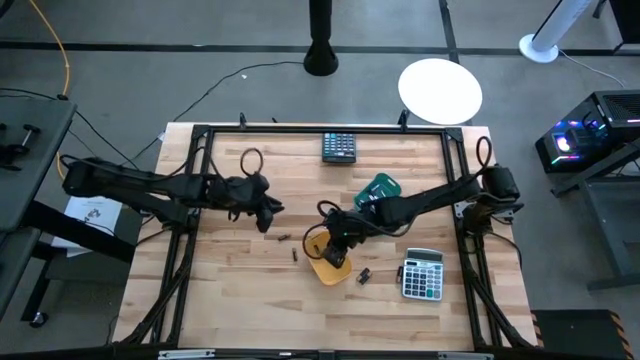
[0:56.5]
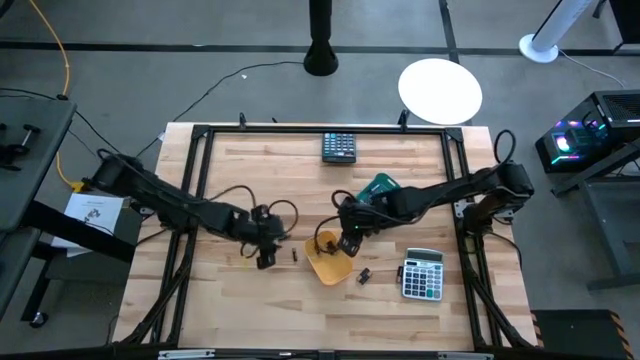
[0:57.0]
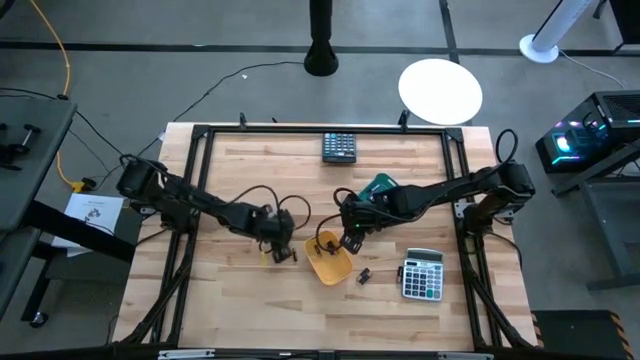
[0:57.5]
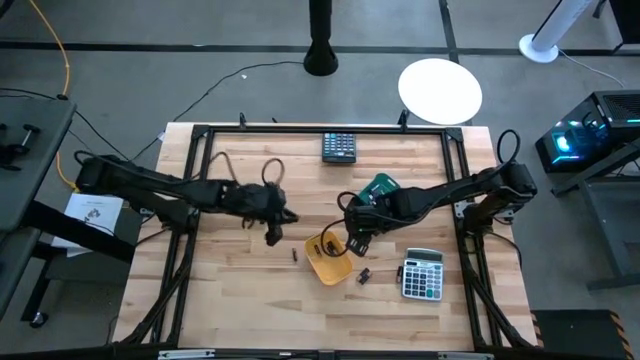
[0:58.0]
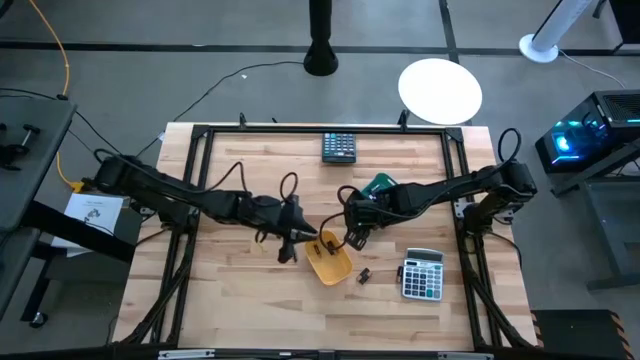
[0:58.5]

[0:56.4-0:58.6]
Task: Sort batteries
Put the black battery into the yellow bin

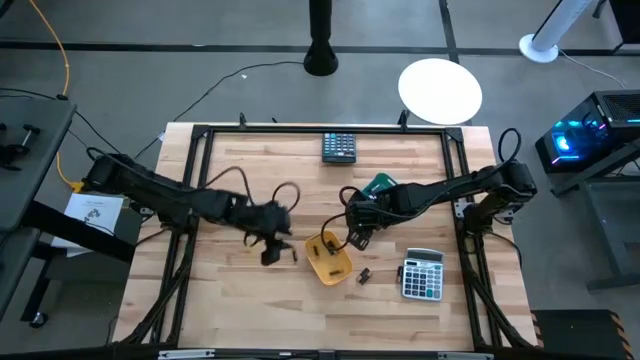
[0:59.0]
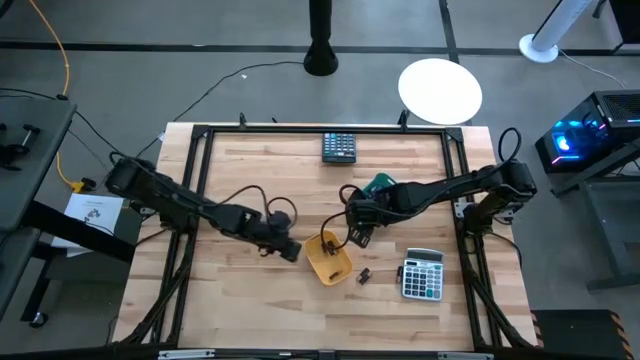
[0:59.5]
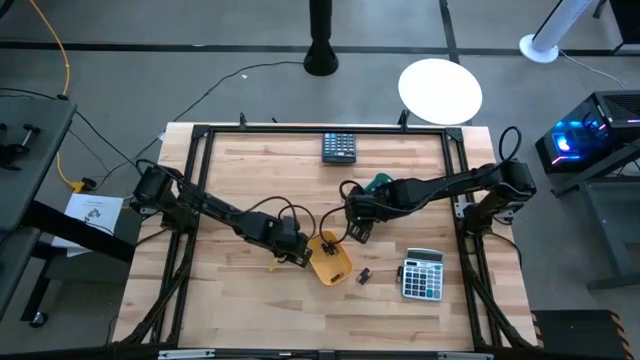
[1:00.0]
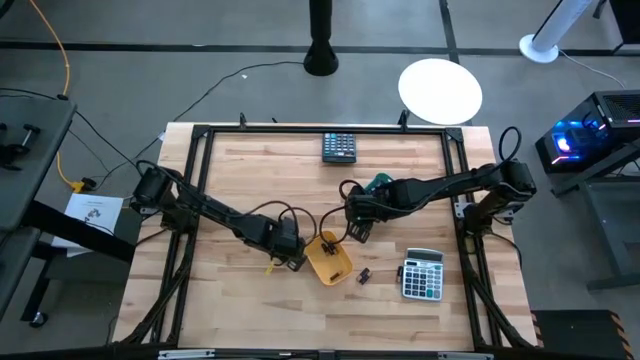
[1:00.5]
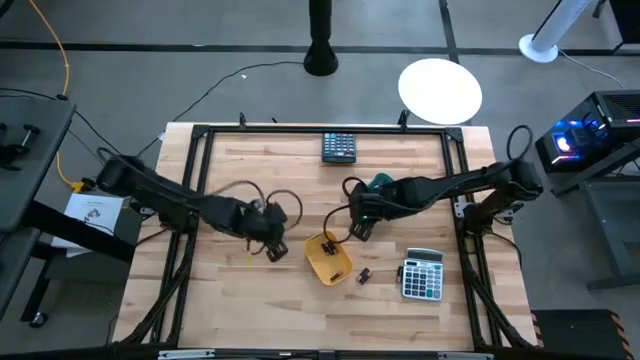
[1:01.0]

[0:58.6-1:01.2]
Put the black battery into the yellow bin

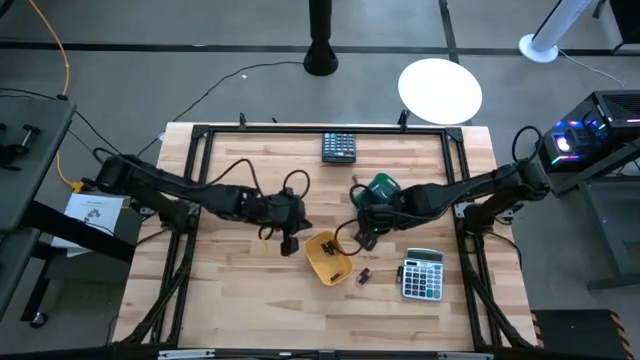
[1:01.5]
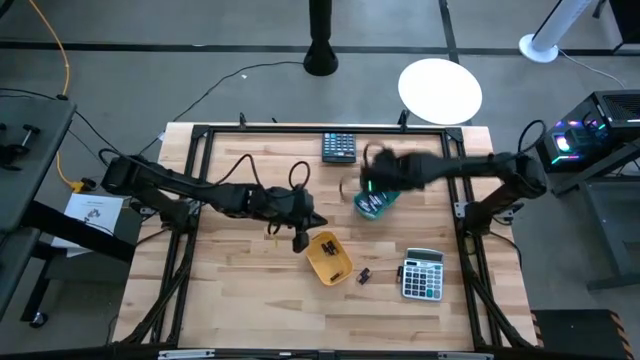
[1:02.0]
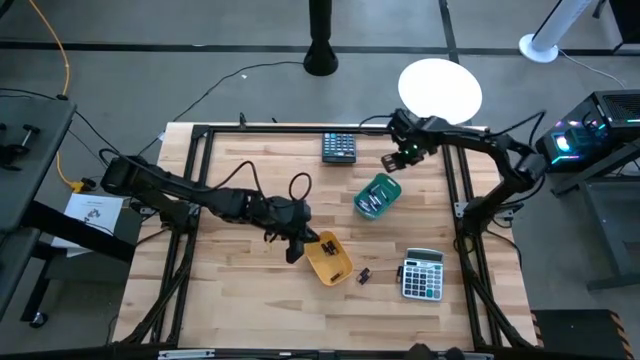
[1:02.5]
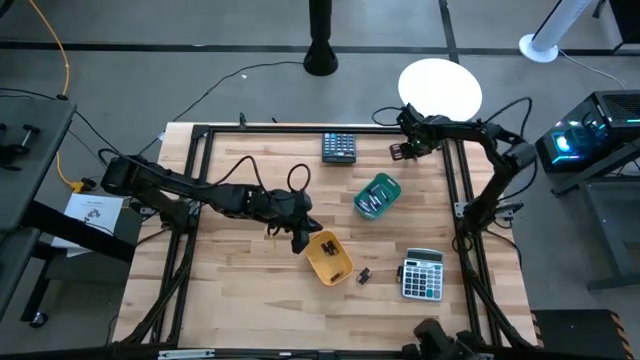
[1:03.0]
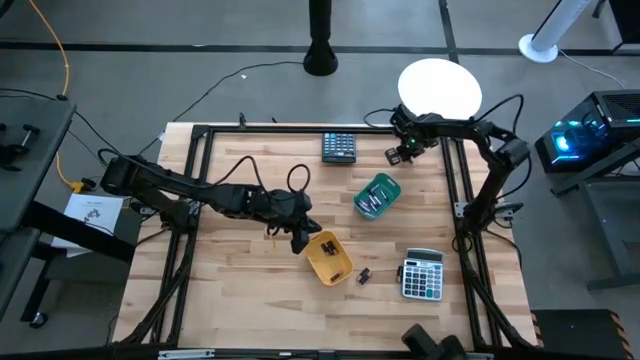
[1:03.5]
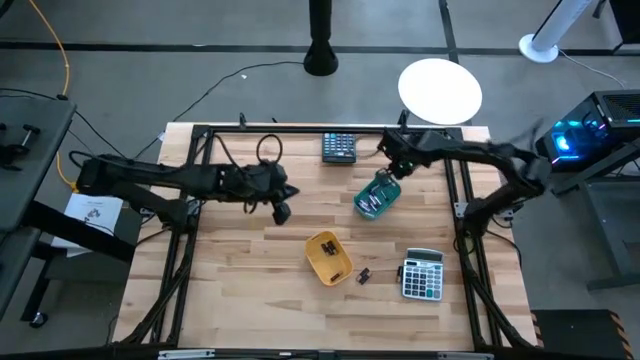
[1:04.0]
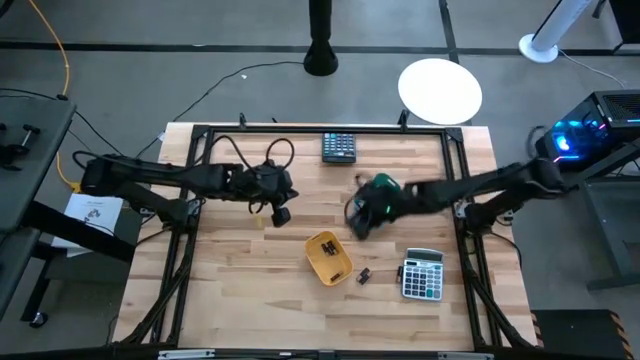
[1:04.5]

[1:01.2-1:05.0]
Put the black battery into the yellow bin

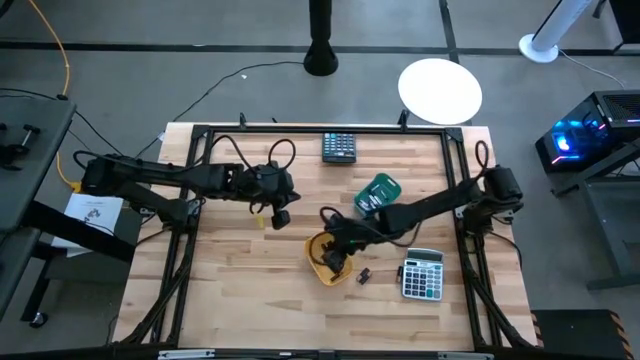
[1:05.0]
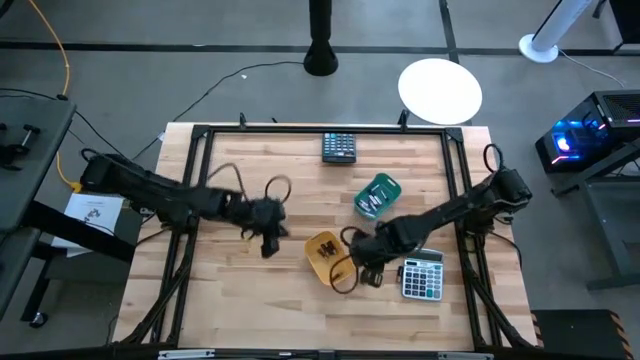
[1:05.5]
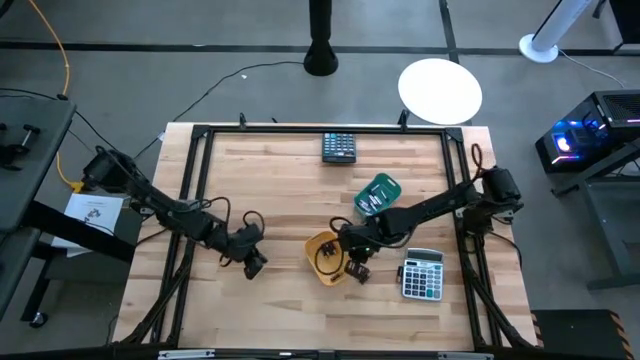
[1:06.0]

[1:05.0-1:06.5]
Adjust the yellow bin

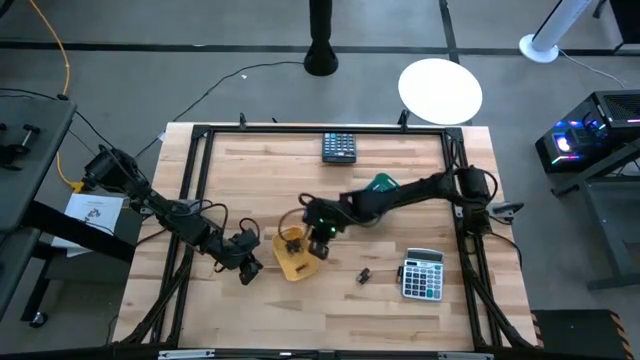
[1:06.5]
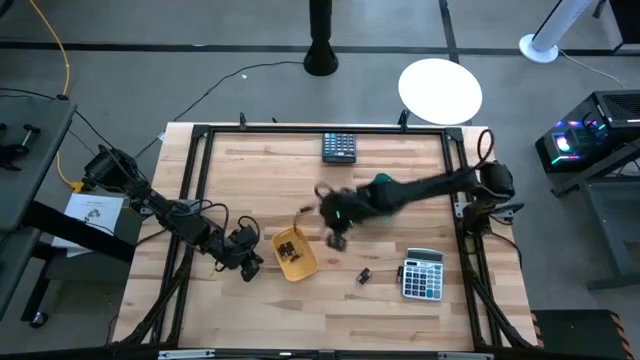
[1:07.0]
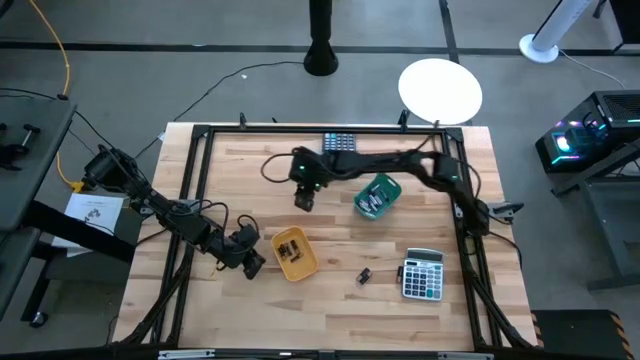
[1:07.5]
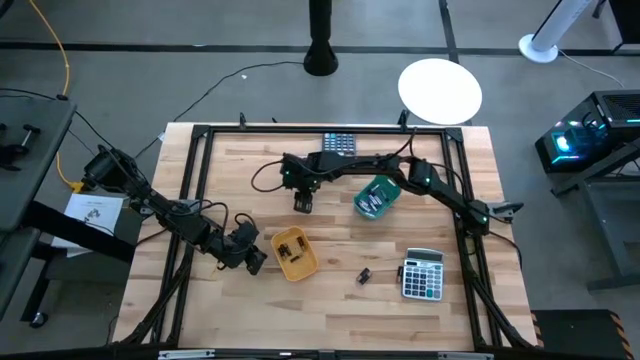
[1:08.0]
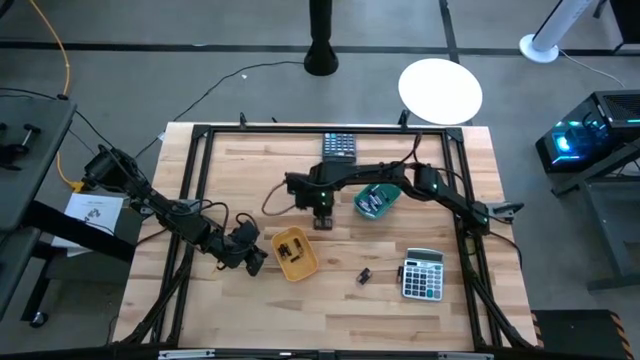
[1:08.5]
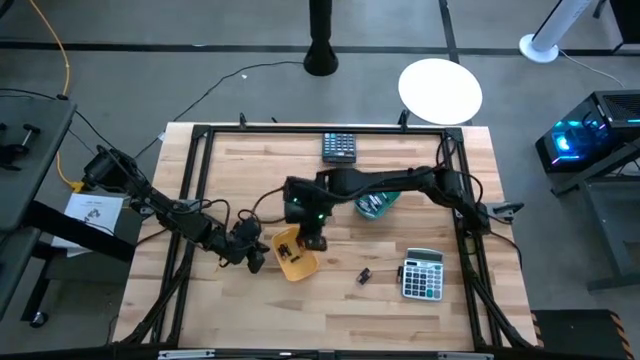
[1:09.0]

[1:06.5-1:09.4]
Put the black battery into the yellow bin

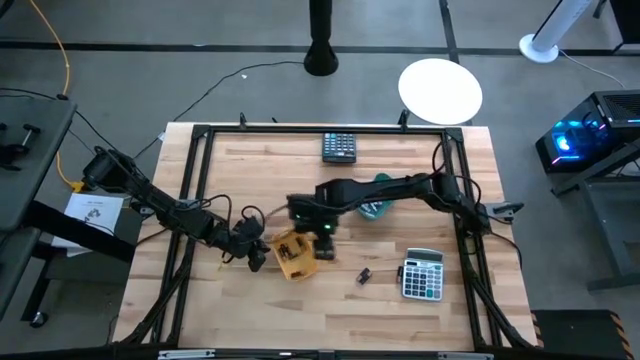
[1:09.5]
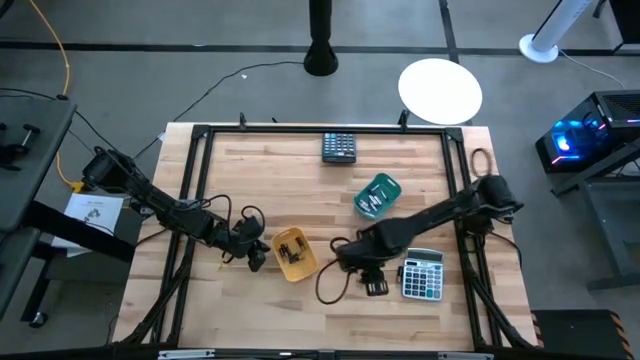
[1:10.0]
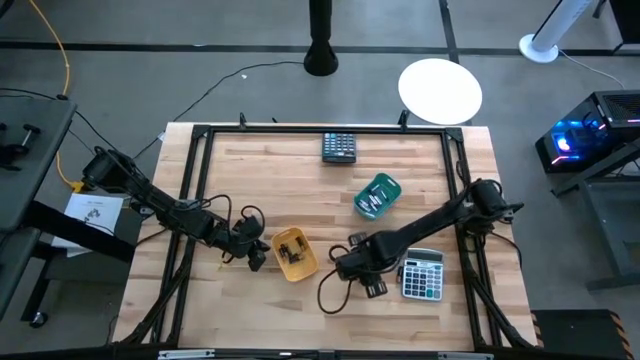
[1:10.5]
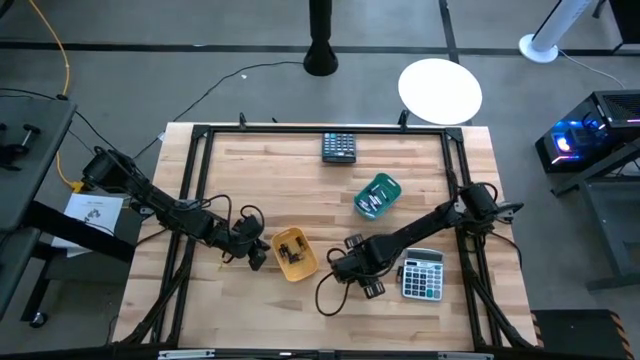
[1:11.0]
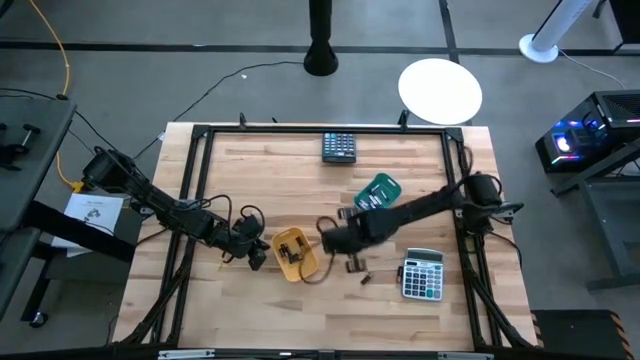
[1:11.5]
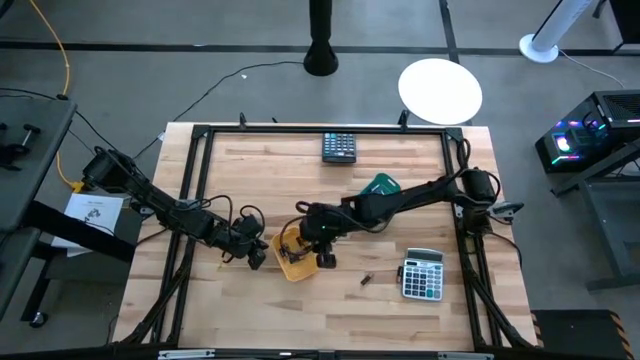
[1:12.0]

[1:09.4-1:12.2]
Put the black battery into the yellow bin

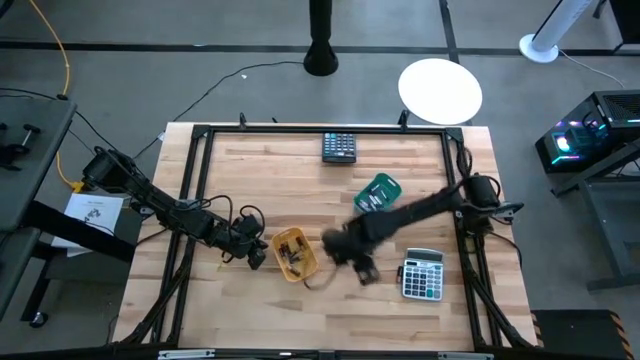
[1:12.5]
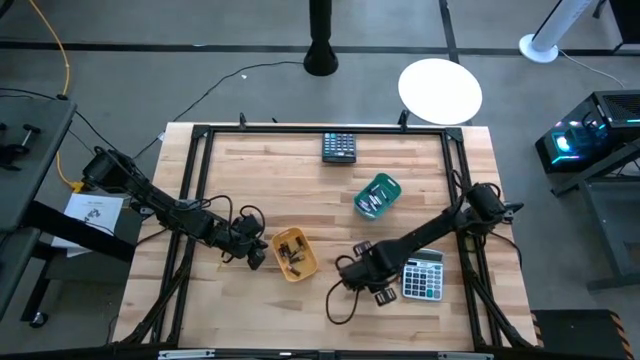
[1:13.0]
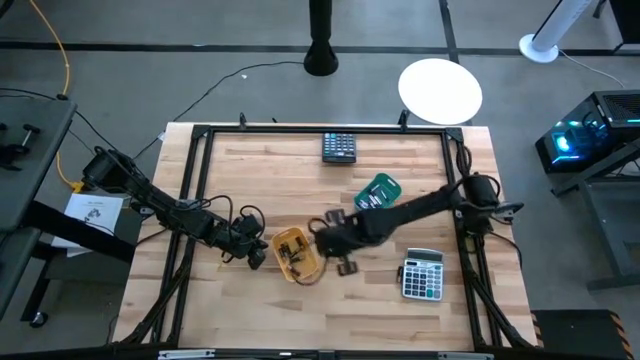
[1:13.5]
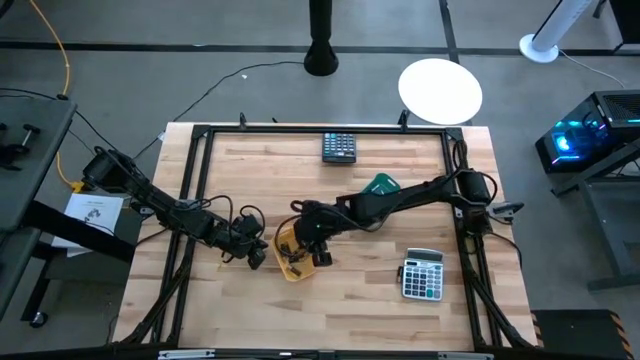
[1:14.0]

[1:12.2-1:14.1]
Put the black battery into the yellow bin

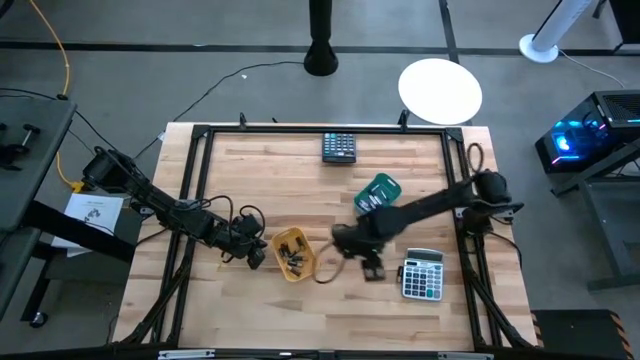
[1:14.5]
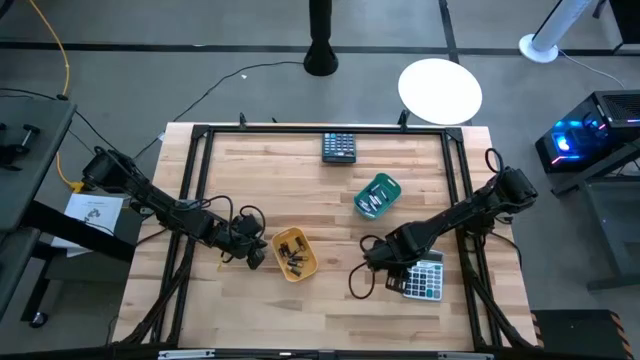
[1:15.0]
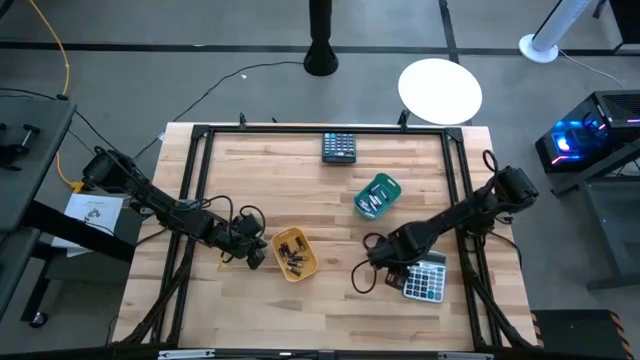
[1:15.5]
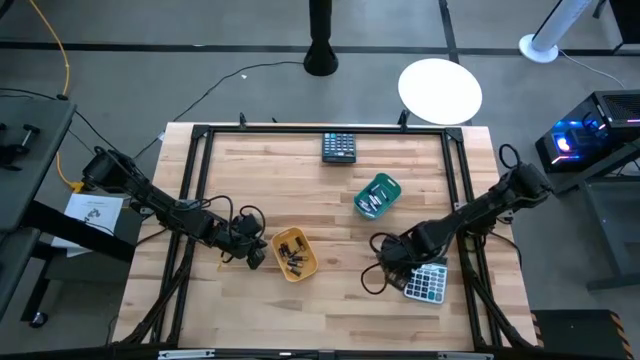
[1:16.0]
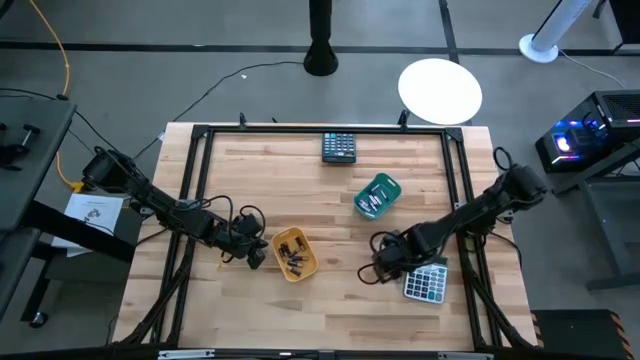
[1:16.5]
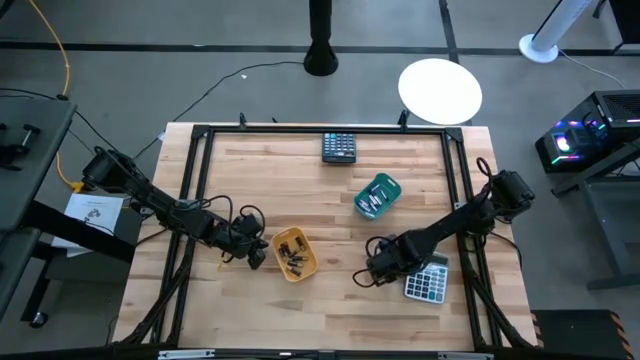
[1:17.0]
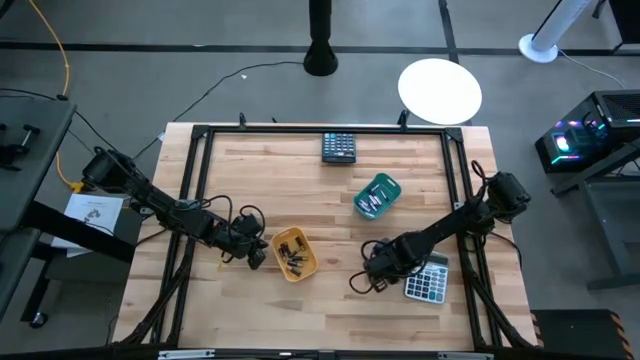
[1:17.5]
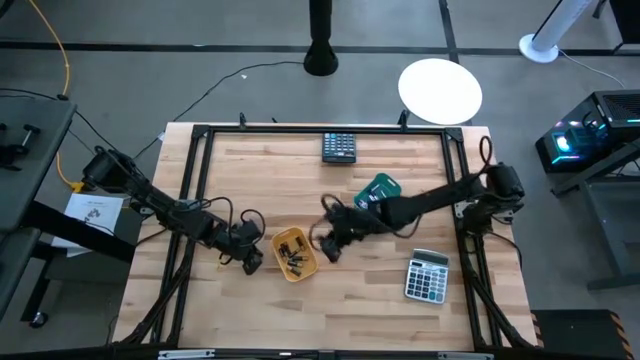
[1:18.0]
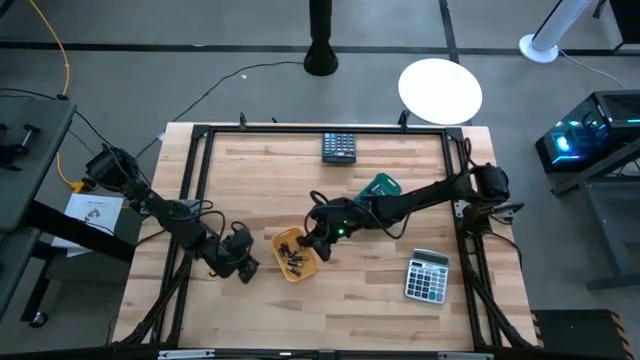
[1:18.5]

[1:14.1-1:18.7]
Put the black battery into the yellow bin
